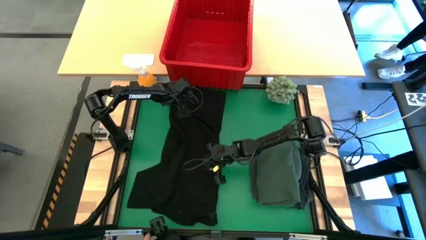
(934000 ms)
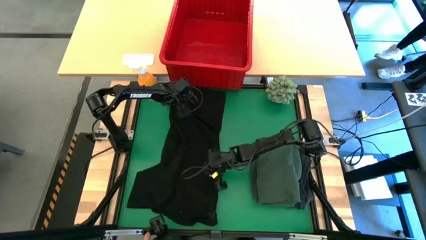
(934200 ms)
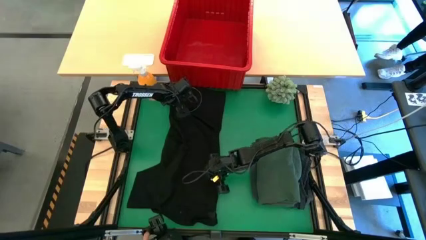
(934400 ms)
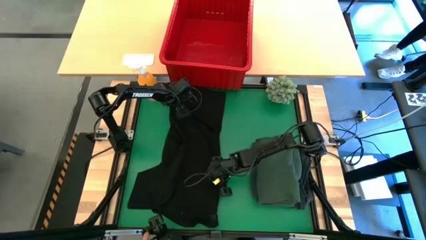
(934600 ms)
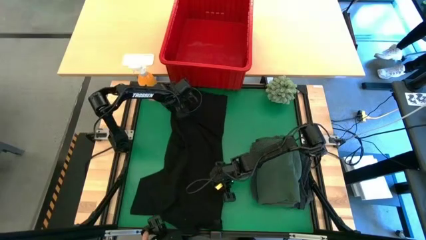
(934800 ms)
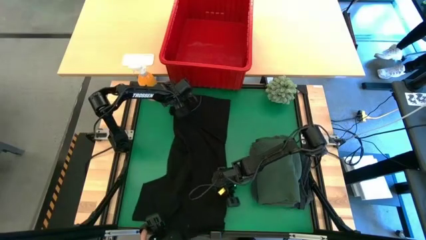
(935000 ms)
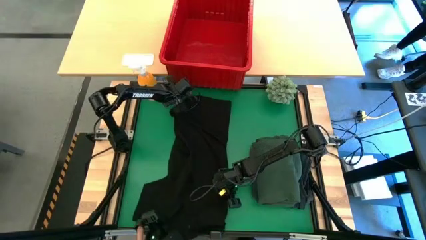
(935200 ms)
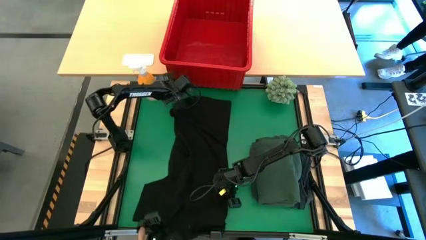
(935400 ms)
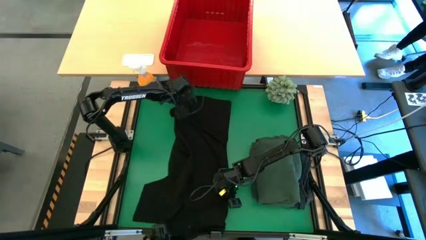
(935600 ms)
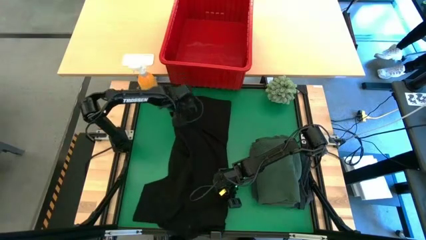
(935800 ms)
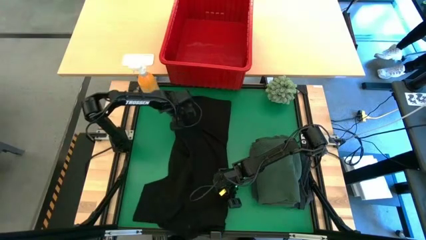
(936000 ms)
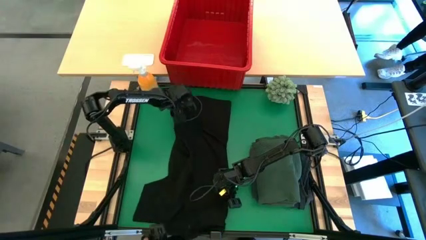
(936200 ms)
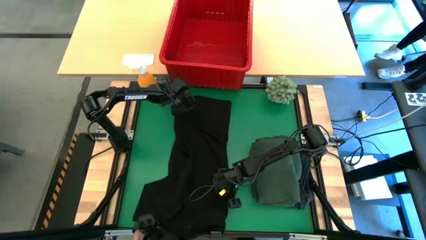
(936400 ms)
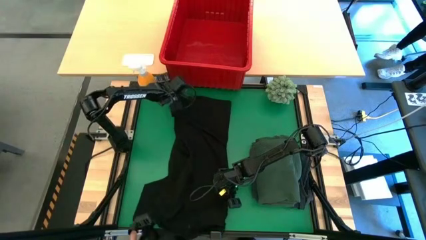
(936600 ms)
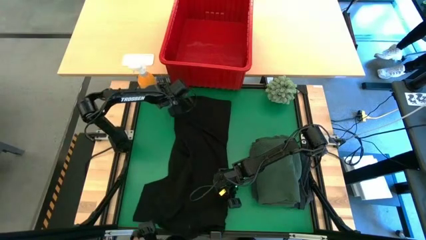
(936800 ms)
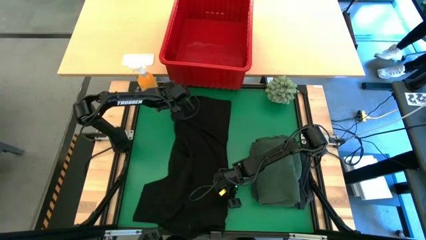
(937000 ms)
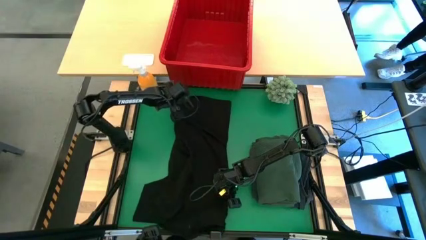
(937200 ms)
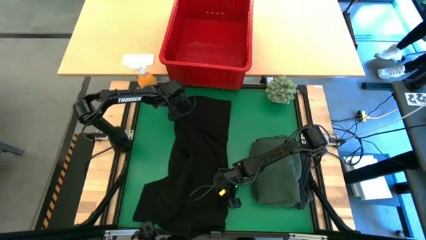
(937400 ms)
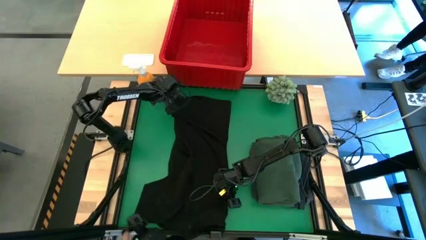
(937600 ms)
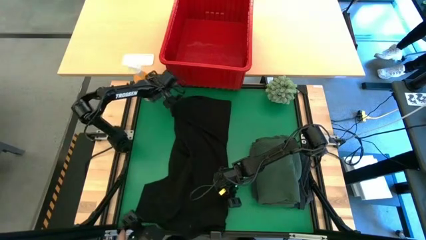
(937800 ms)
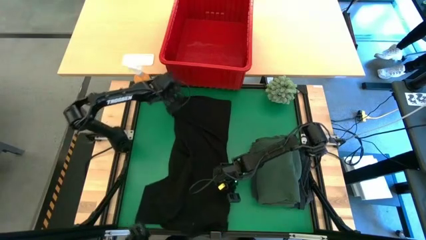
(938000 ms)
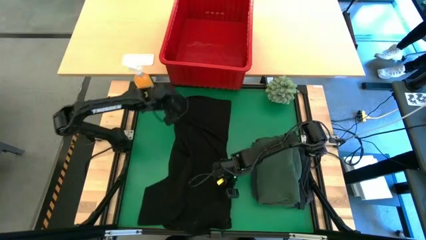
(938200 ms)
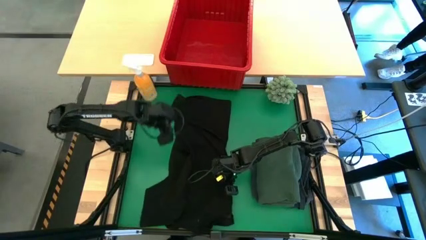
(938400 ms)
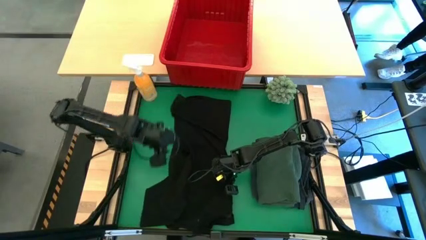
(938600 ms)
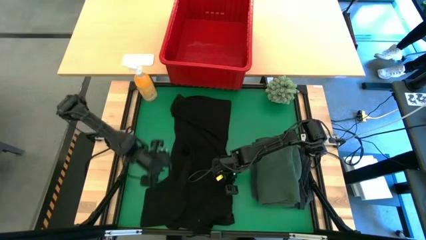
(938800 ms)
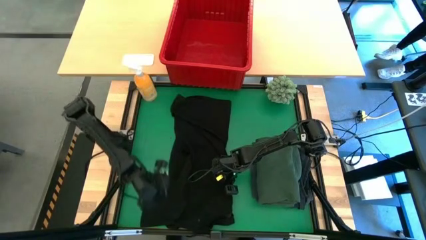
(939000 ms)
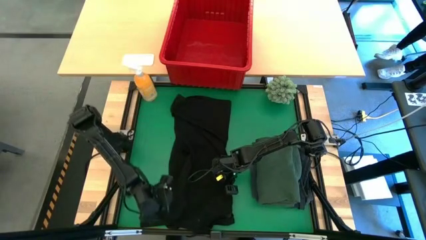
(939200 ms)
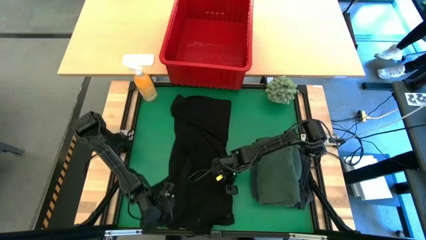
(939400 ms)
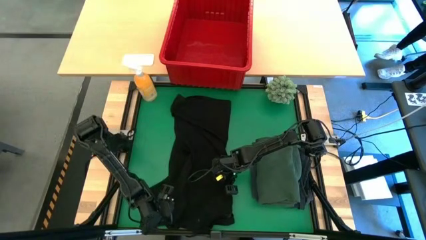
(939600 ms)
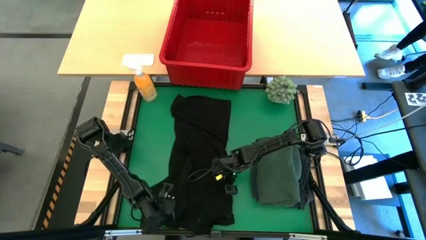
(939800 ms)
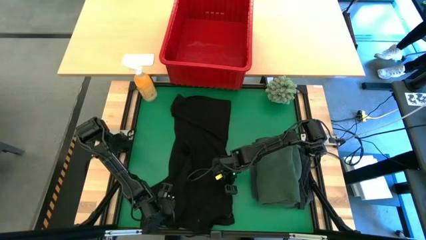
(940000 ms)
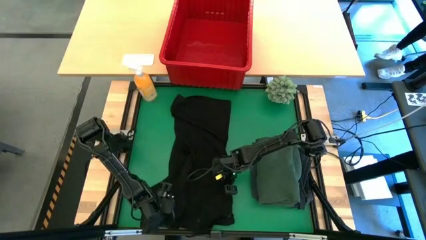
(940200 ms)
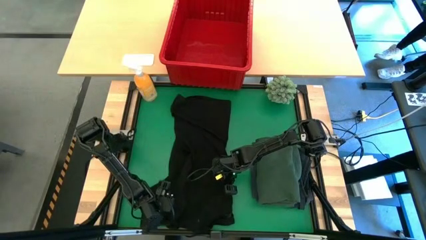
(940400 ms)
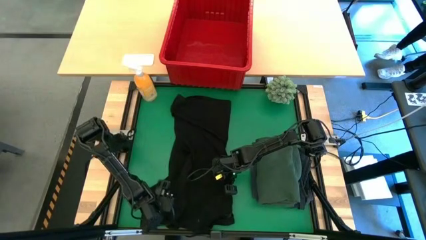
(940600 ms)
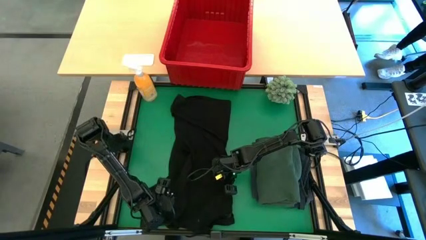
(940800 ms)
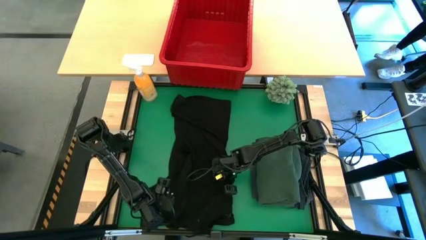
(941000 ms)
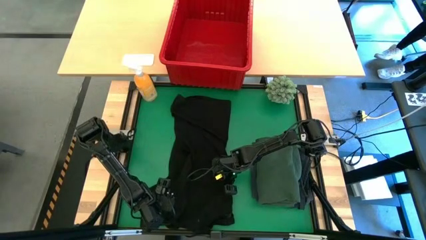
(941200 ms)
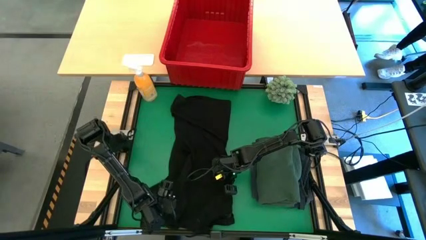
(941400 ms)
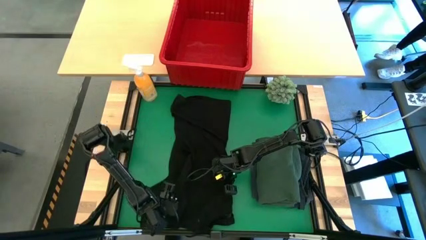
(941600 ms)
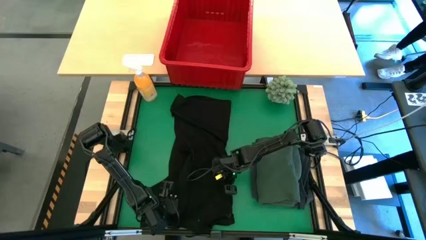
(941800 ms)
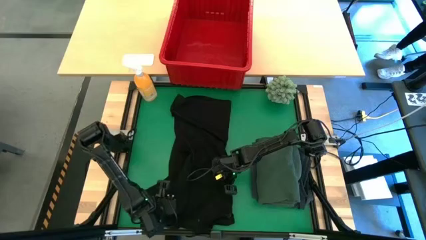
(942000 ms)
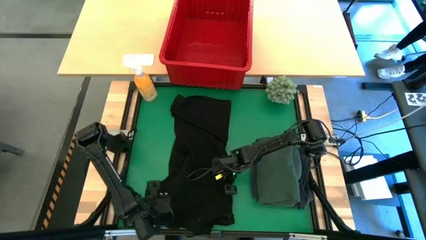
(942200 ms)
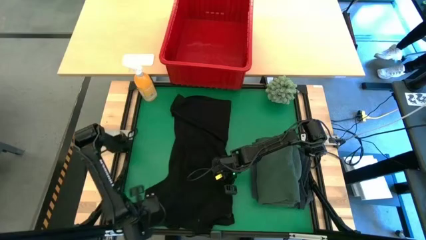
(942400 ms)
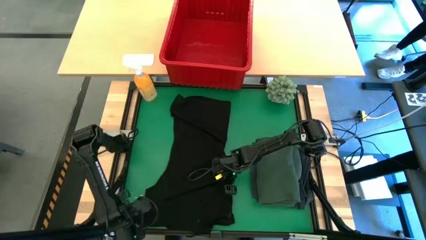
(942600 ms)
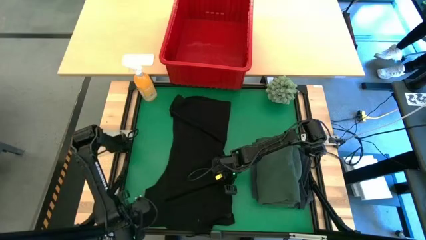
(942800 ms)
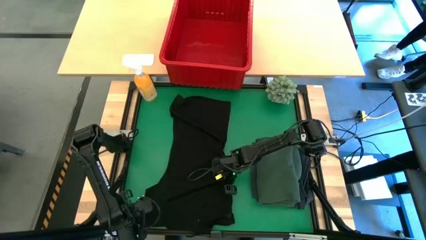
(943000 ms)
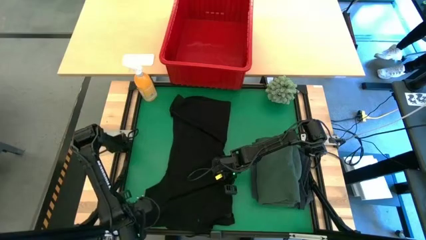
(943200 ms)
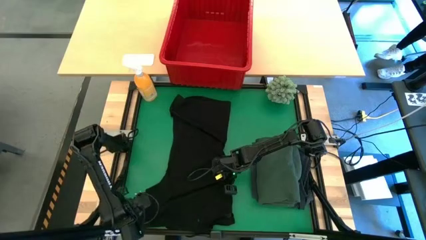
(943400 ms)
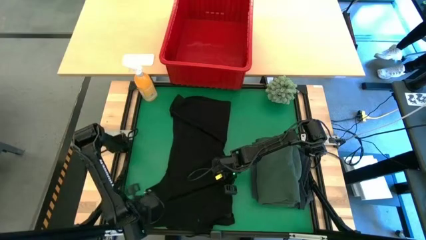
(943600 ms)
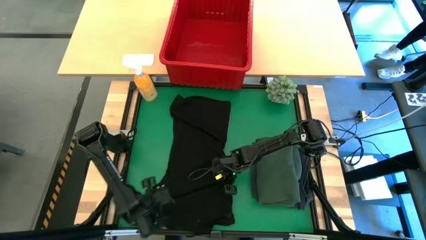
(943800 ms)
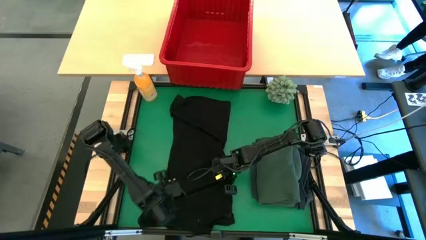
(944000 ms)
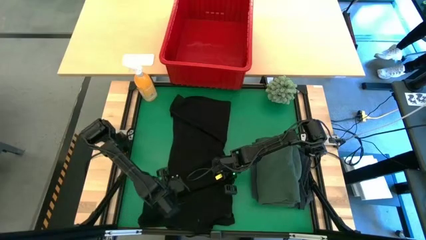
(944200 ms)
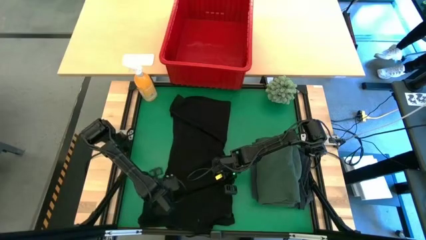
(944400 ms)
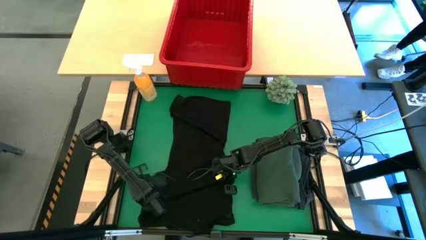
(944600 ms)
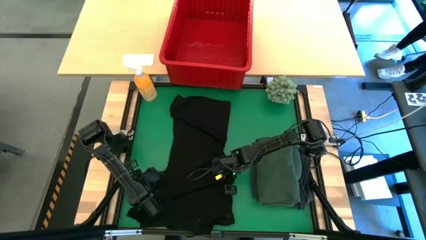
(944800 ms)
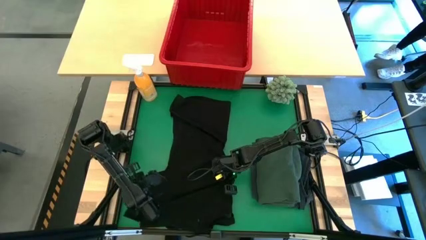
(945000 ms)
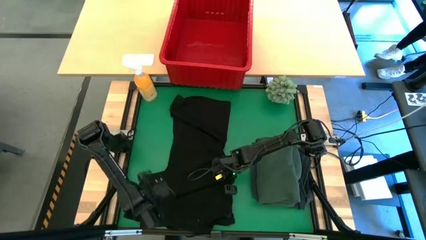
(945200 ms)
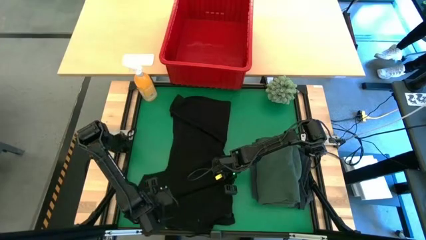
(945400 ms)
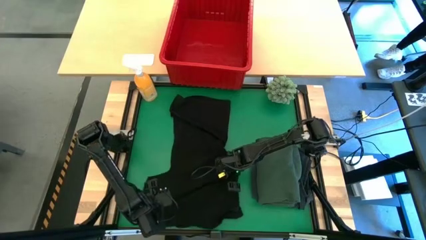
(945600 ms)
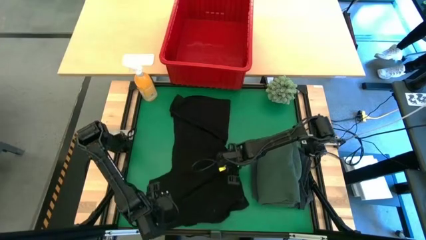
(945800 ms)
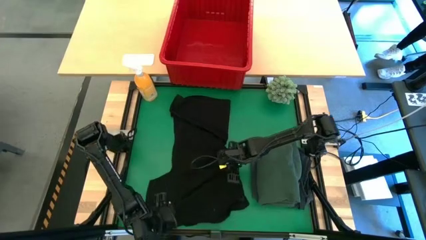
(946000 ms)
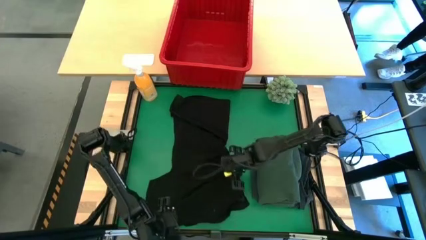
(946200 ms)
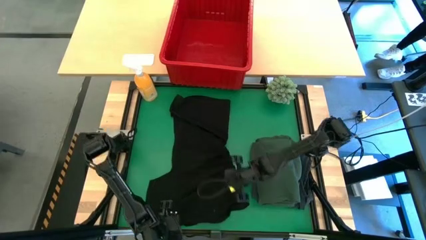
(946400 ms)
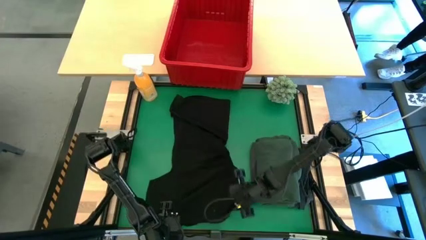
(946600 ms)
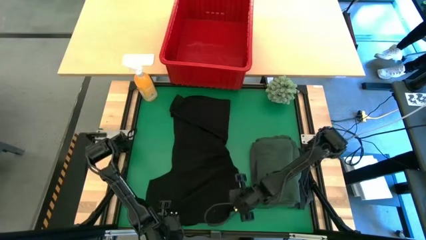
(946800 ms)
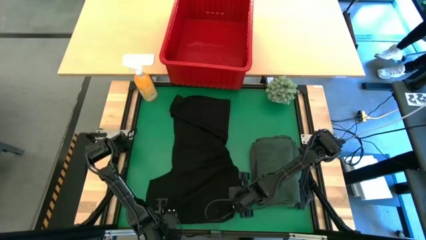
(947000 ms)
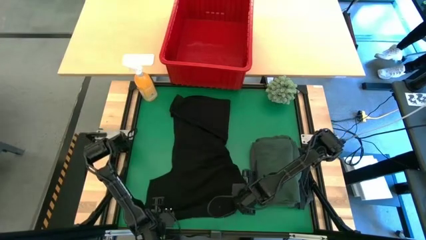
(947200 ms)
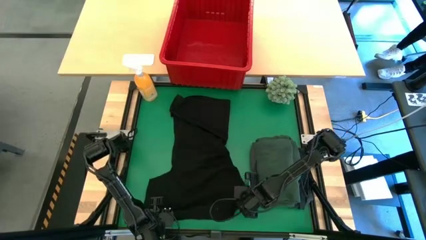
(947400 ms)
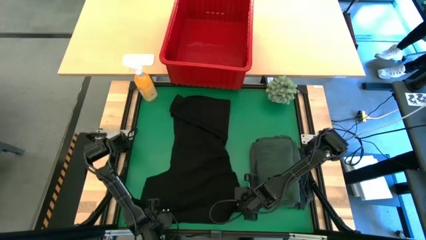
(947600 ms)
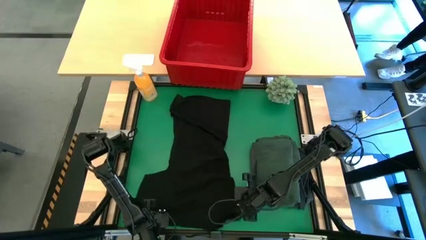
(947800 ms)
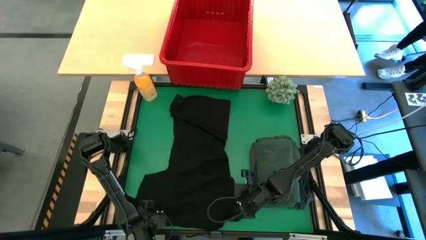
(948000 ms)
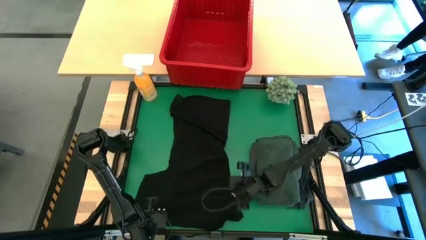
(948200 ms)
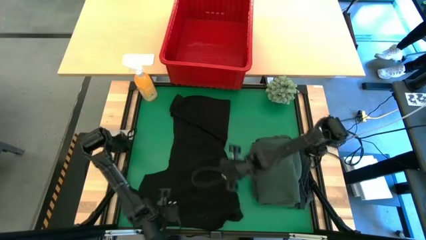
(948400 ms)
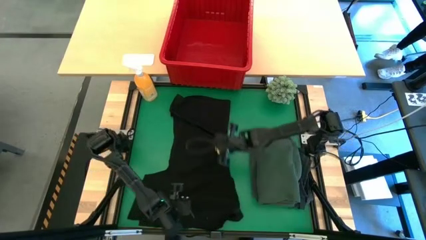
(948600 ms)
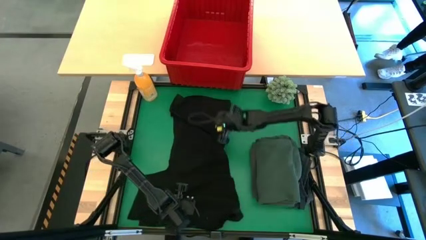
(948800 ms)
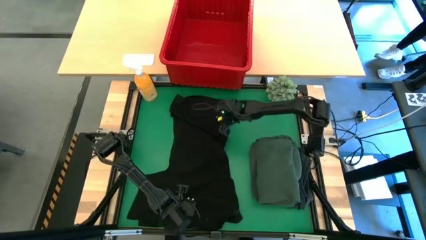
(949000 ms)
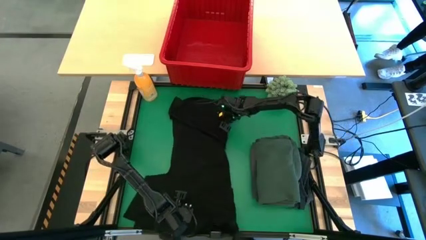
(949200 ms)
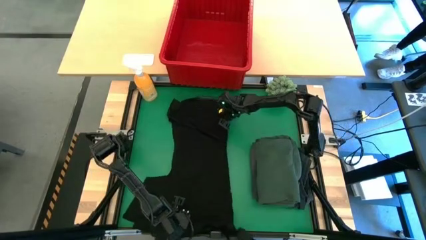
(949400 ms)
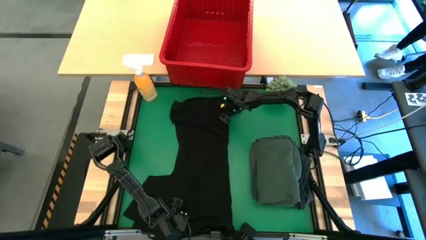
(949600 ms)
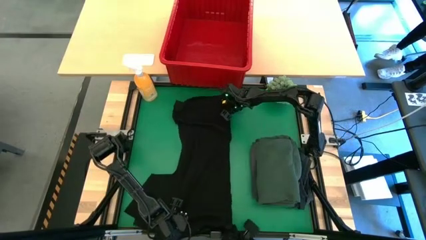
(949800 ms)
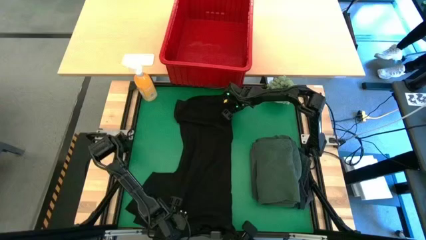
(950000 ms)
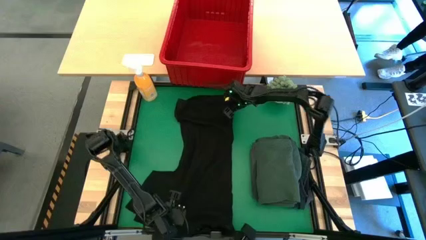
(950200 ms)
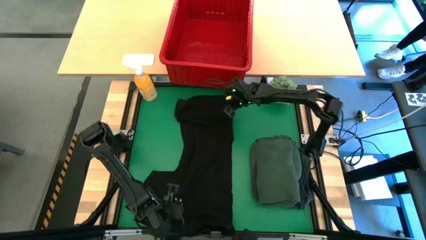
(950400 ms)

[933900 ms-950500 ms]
Task: Fold Laundry from Bin
Fold the black shirt
